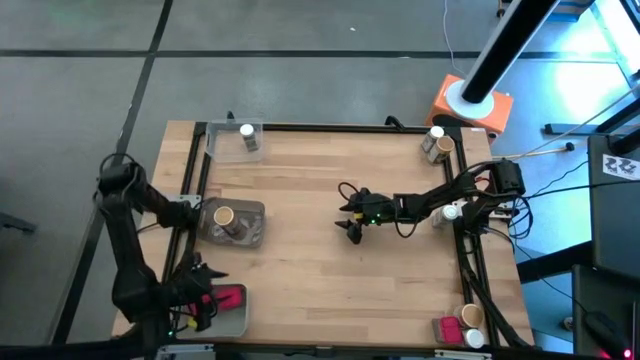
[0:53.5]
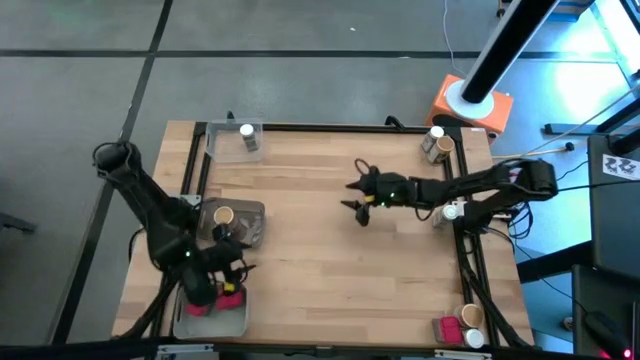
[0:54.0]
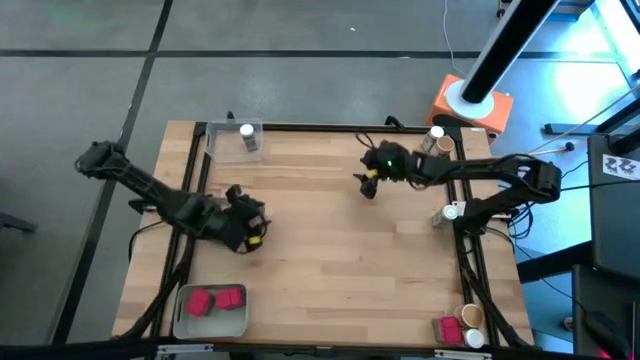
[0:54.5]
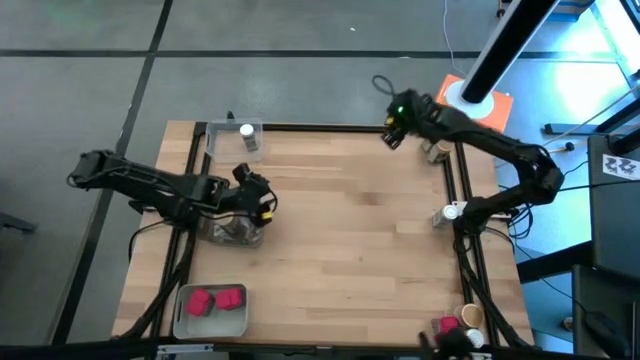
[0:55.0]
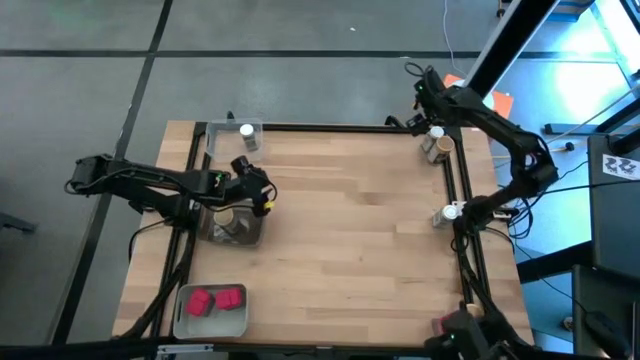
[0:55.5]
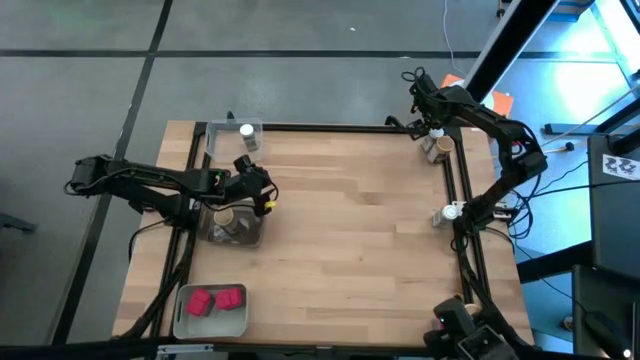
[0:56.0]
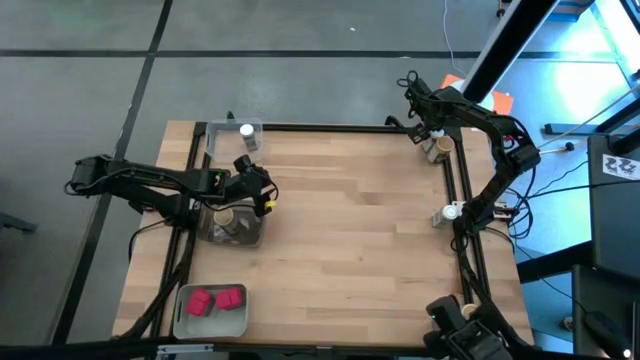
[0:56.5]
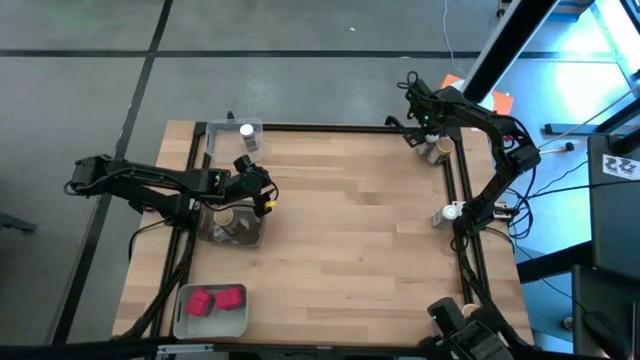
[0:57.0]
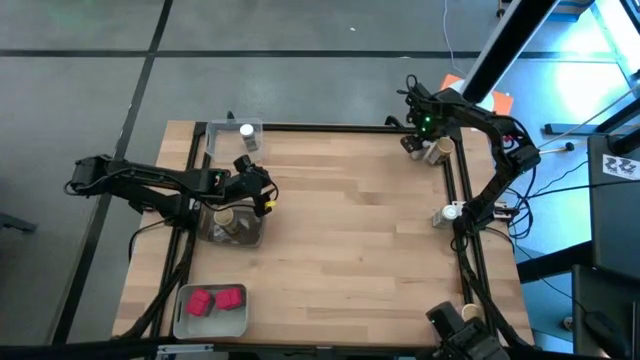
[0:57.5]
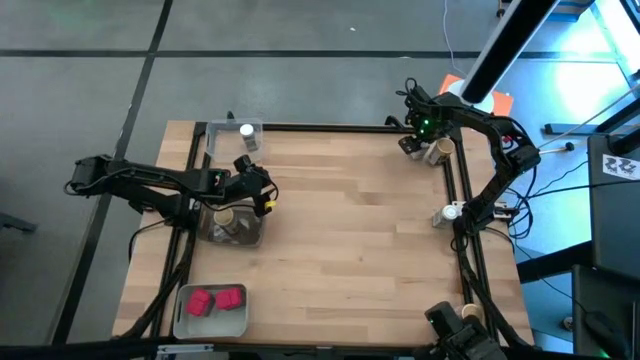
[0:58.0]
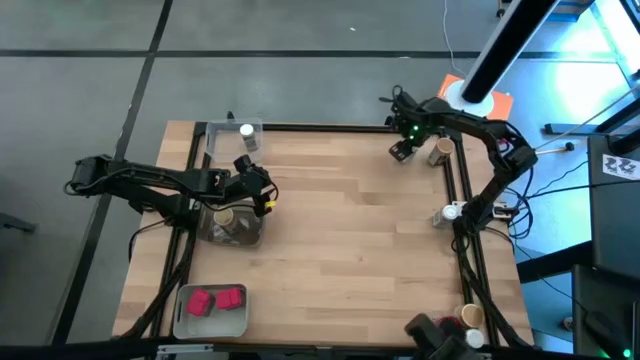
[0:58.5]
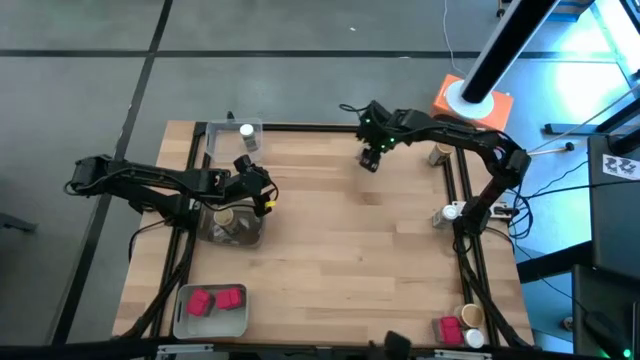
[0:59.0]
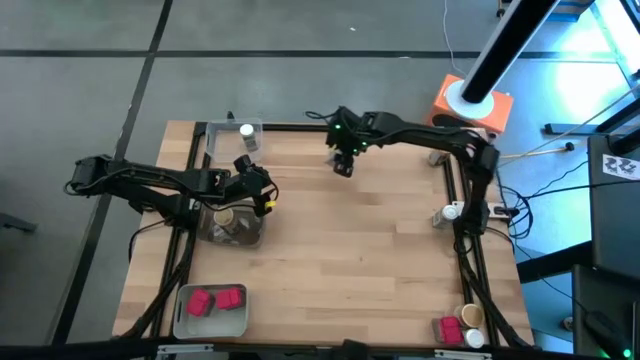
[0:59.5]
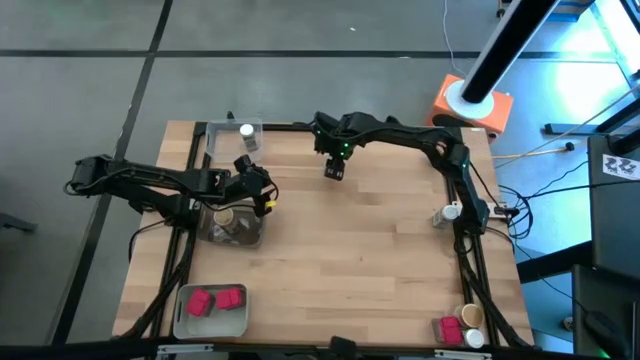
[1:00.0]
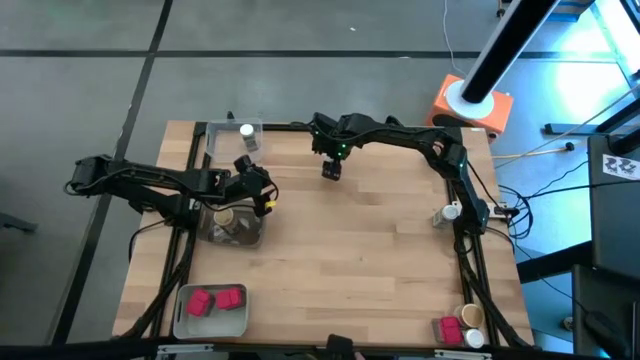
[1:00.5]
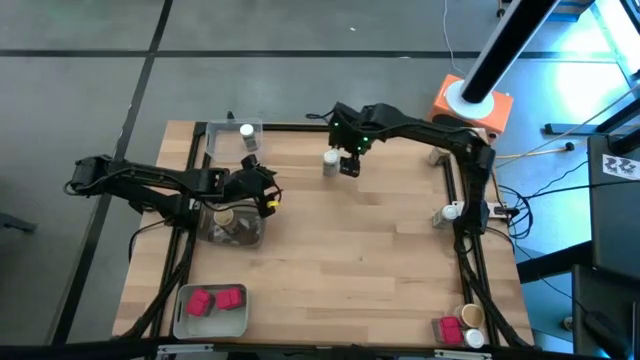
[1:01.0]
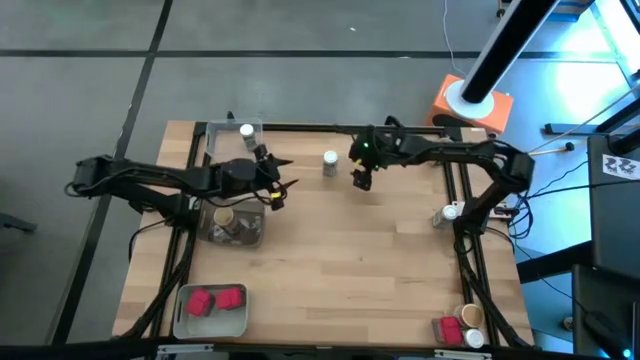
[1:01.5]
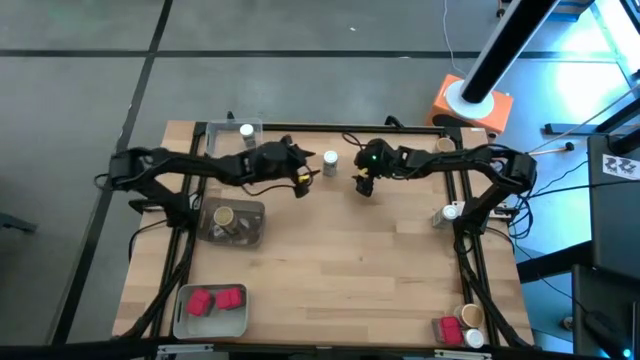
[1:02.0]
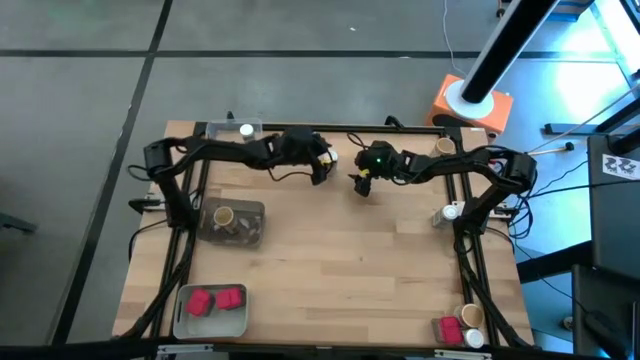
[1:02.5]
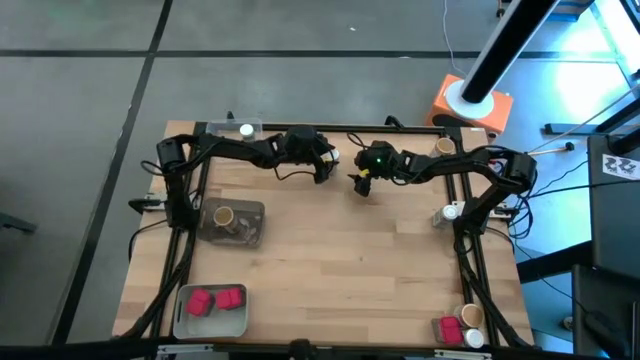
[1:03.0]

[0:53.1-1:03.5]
Task: Sort spices by type
Put the top white spice bottle into the transparent bin

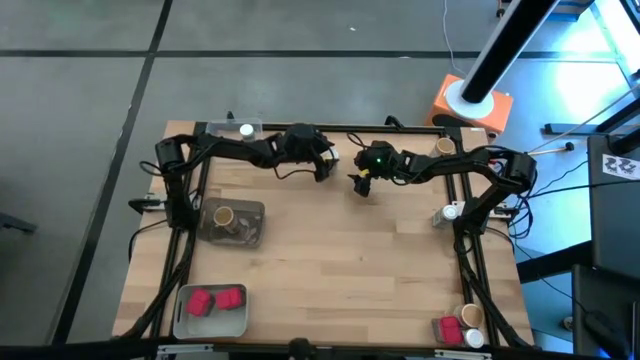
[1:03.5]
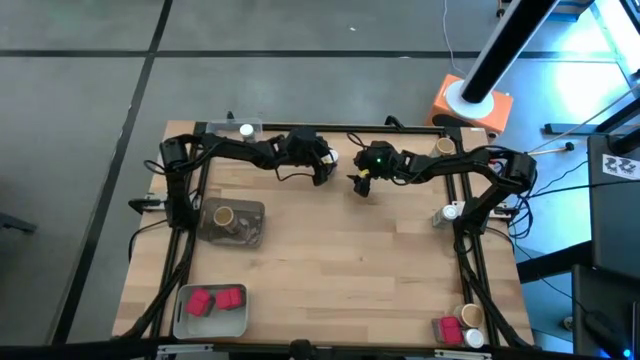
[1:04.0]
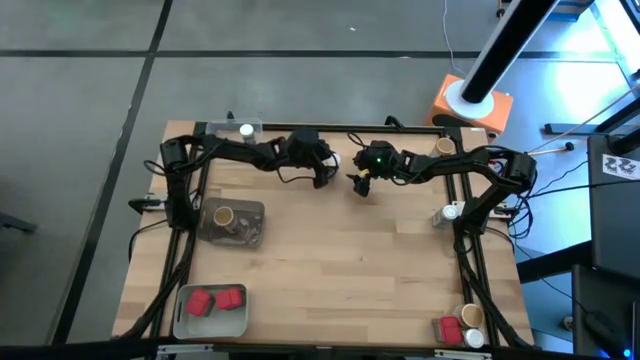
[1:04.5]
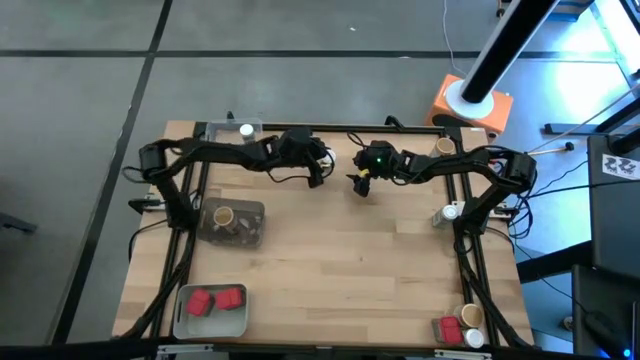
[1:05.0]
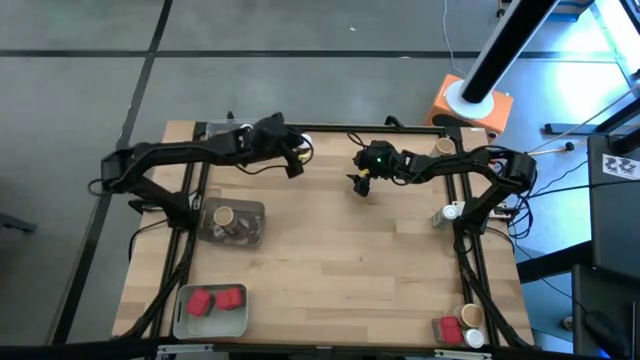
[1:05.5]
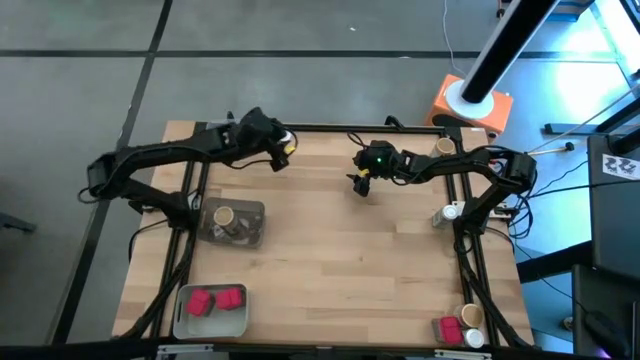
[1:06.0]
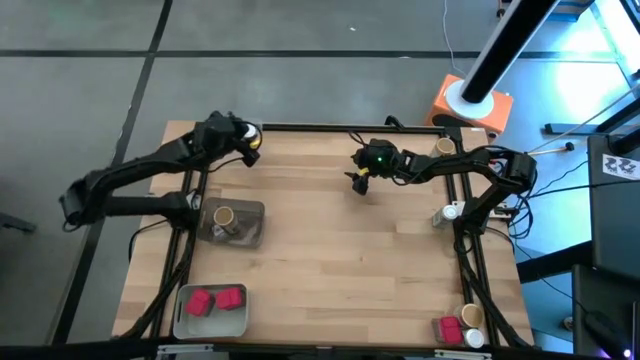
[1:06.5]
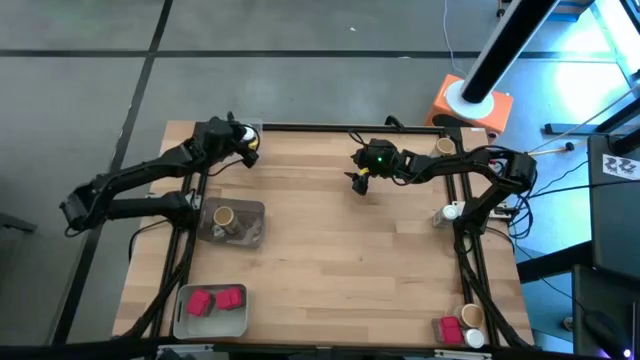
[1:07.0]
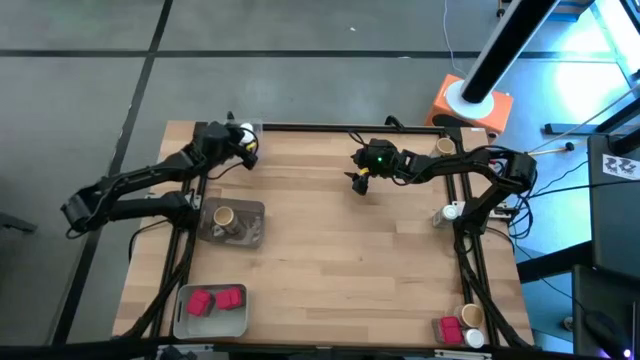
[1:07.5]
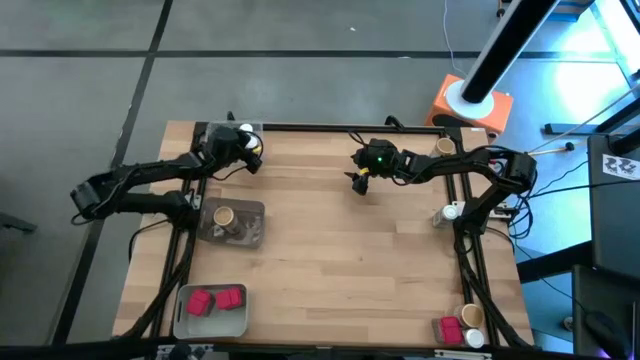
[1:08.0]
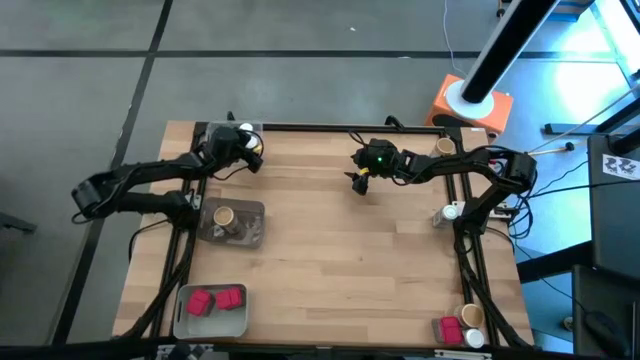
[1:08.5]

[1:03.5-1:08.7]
Put the top white spice bottle into the transparent bin

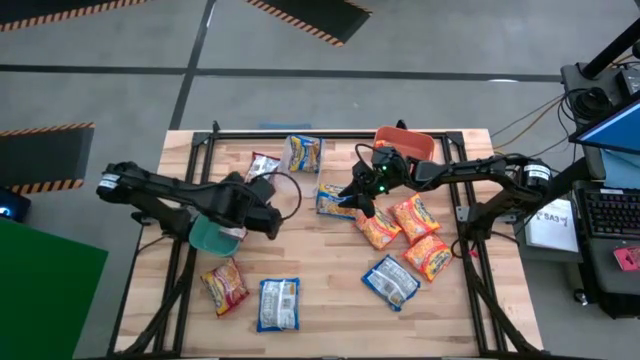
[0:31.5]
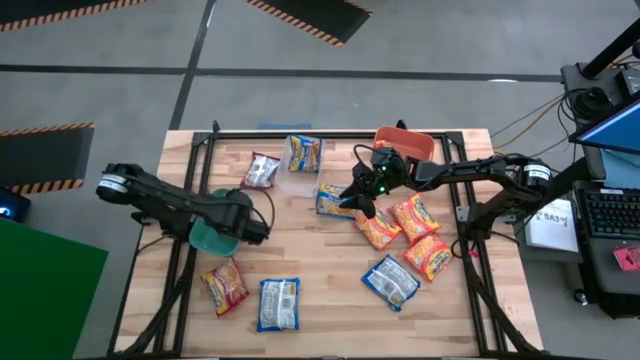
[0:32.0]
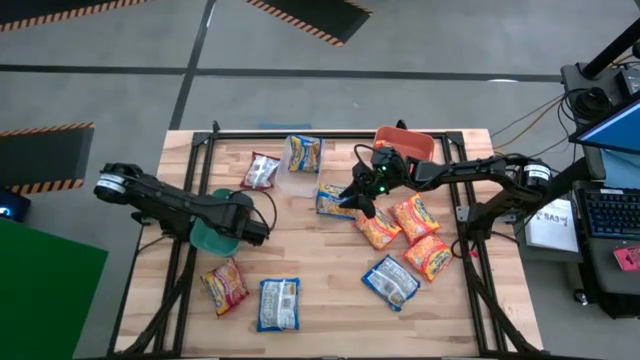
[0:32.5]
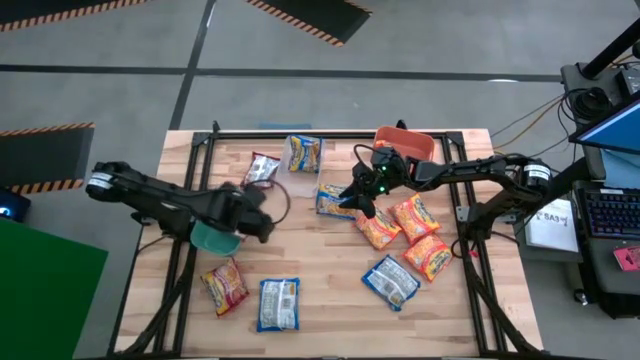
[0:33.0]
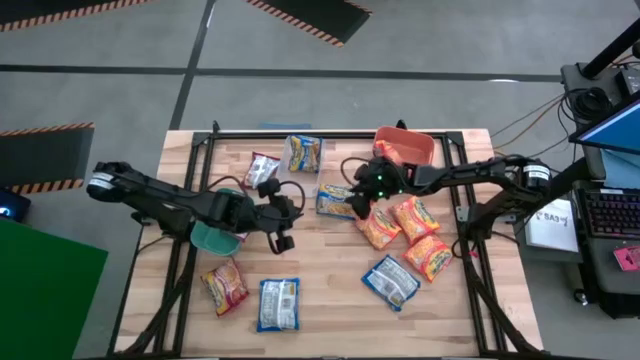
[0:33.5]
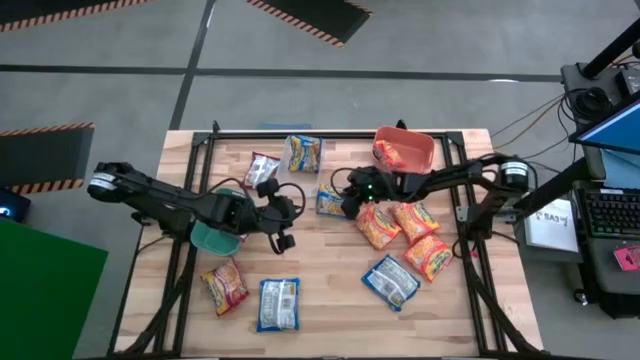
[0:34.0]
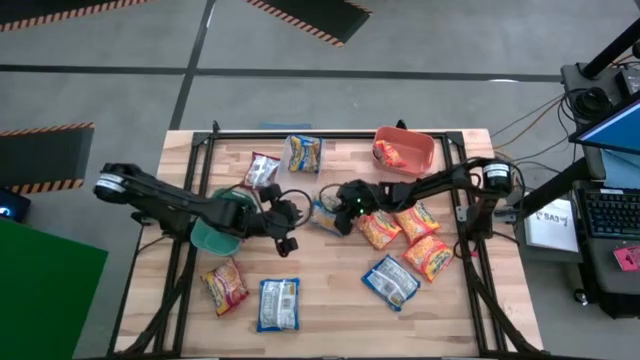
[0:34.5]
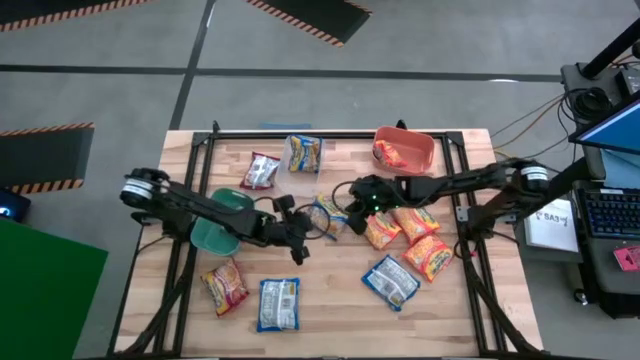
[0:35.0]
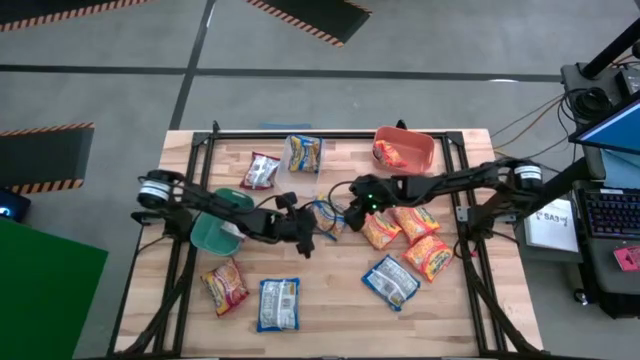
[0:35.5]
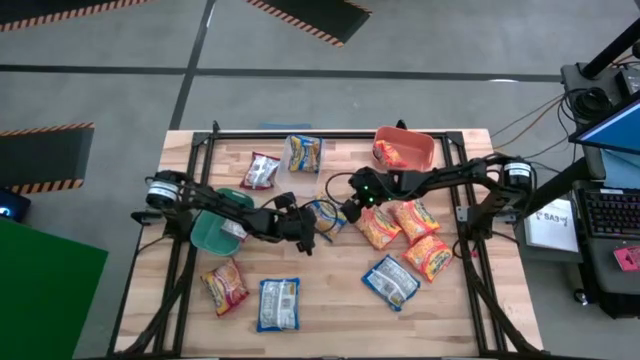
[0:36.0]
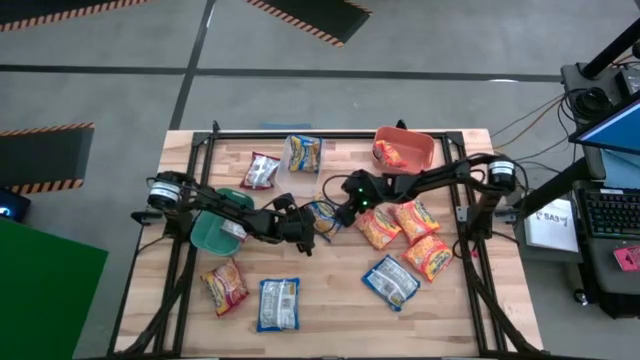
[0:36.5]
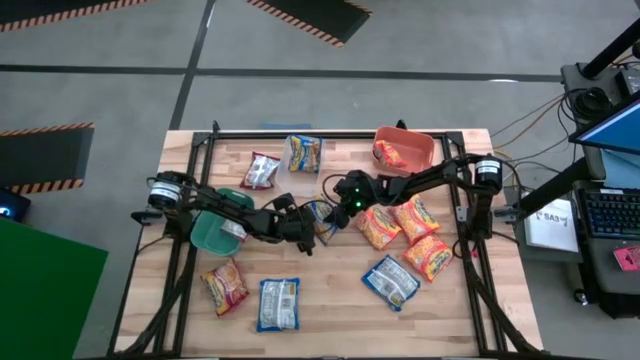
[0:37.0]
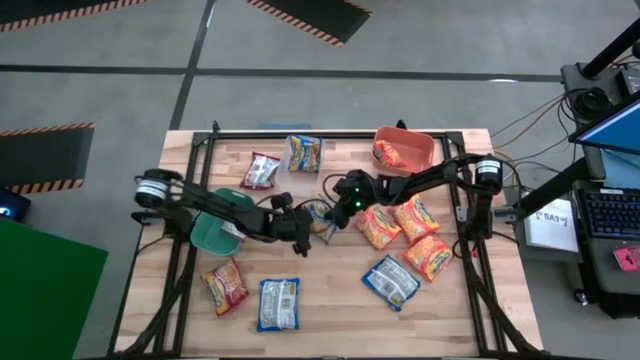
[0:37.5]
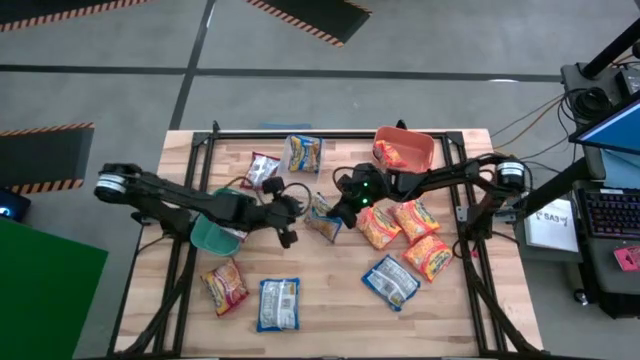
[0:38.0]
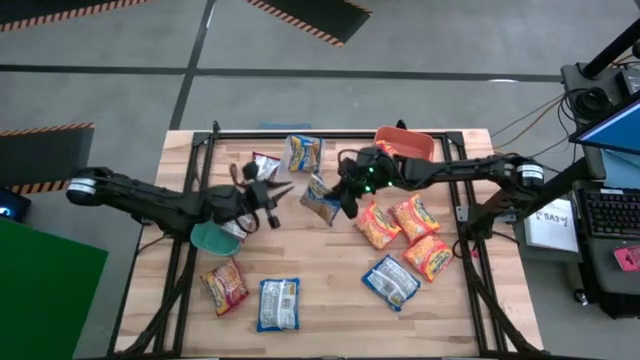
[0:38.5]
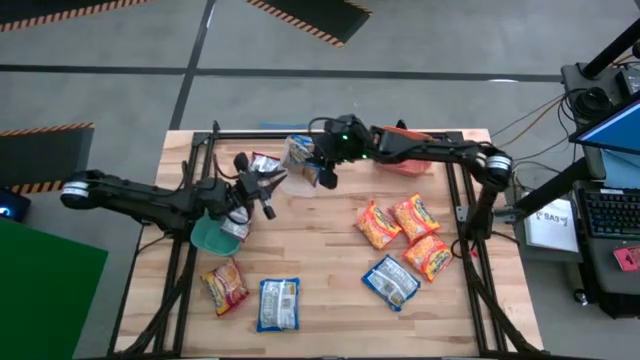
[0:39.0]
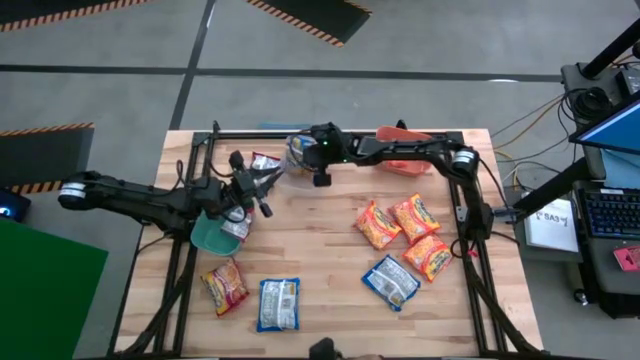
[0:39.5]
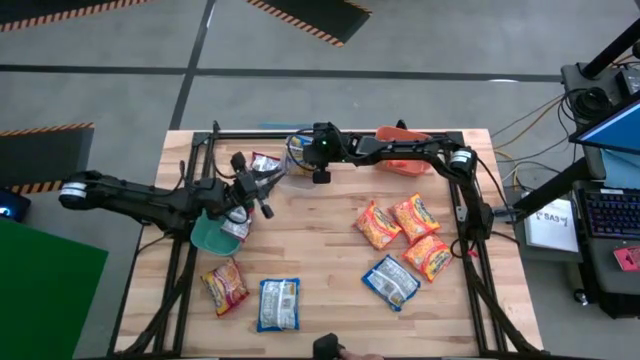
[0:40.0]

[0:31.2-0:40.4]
Task: Sort Maruchan noodles
Put the blue noodle pack into the transparent bin
